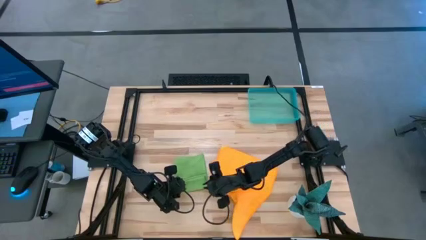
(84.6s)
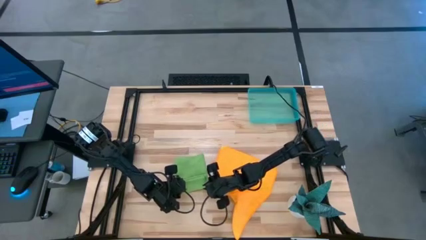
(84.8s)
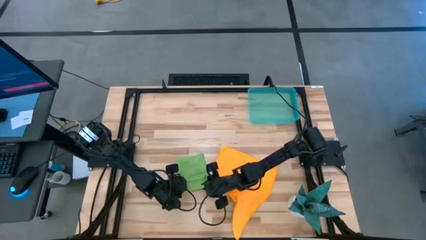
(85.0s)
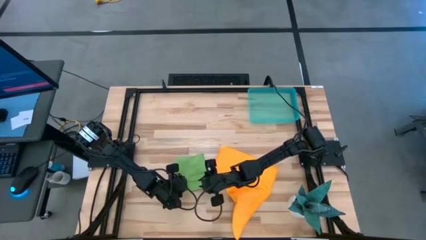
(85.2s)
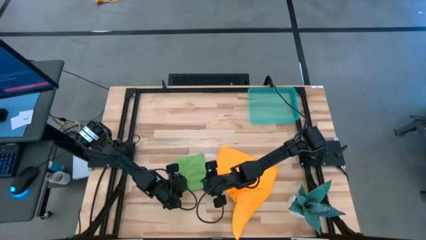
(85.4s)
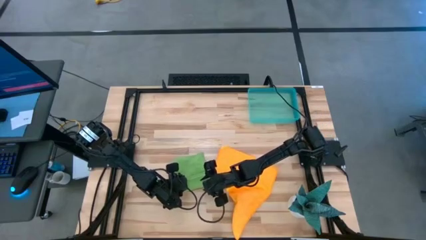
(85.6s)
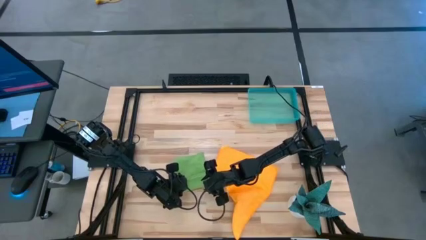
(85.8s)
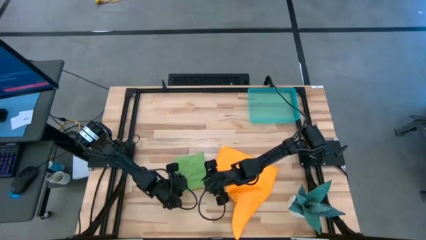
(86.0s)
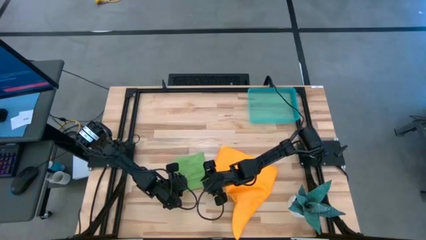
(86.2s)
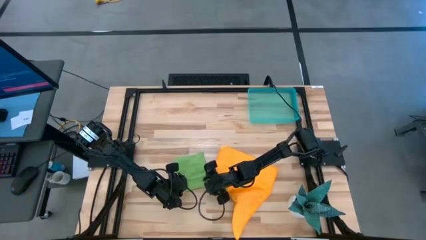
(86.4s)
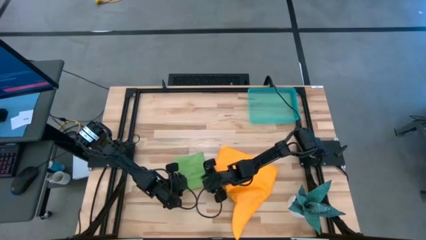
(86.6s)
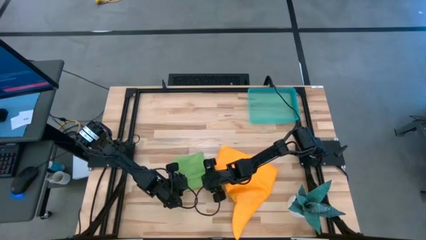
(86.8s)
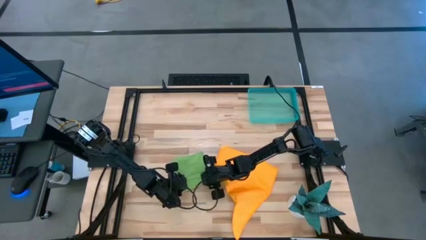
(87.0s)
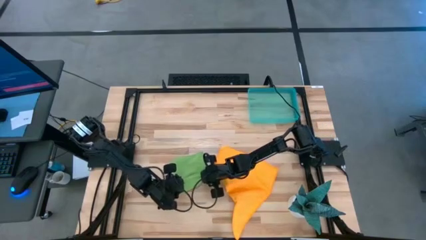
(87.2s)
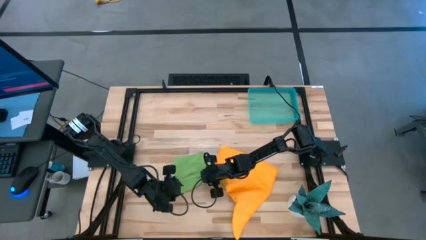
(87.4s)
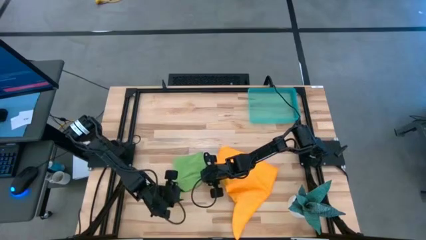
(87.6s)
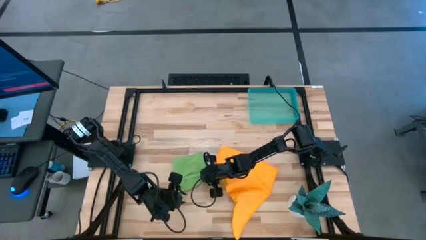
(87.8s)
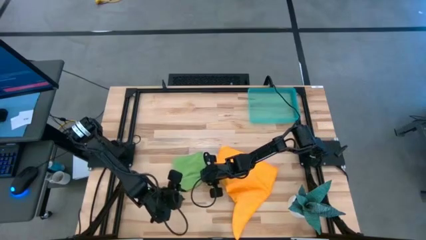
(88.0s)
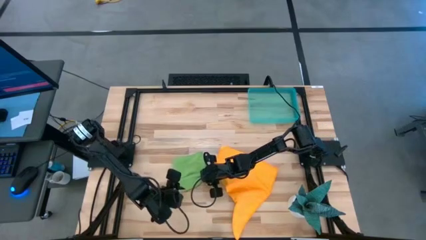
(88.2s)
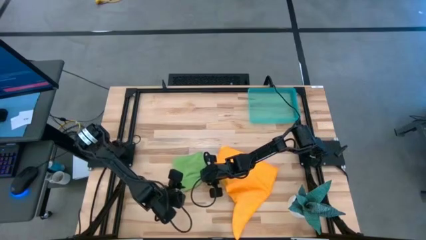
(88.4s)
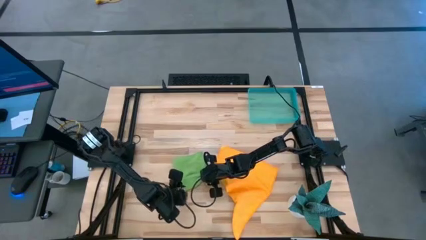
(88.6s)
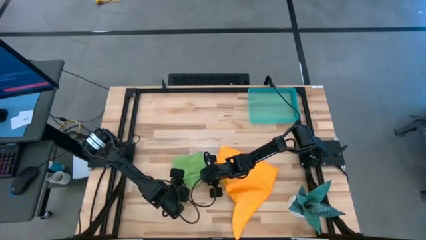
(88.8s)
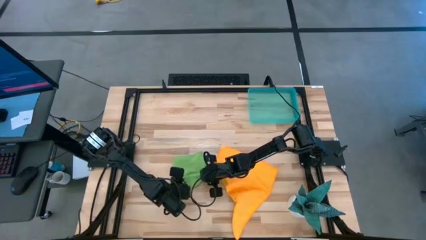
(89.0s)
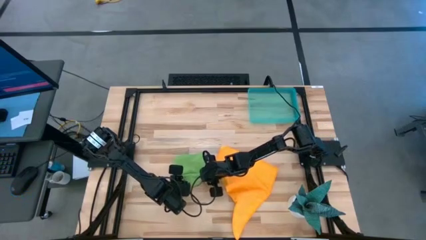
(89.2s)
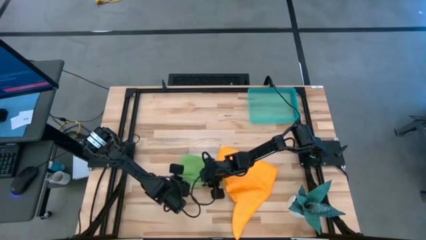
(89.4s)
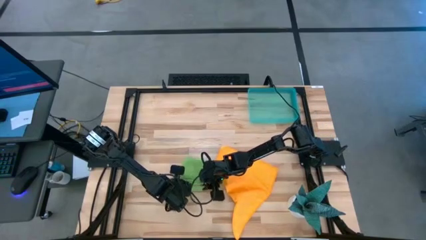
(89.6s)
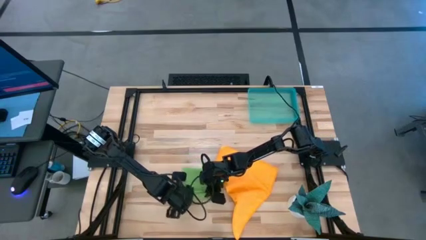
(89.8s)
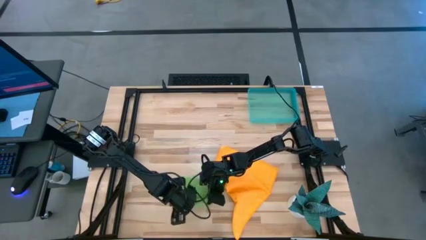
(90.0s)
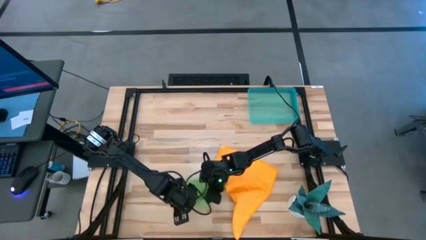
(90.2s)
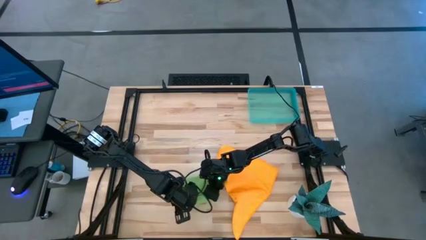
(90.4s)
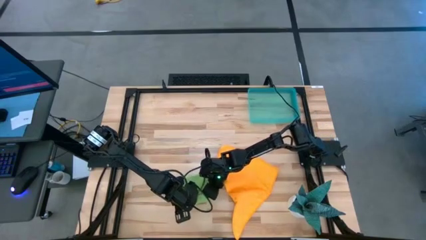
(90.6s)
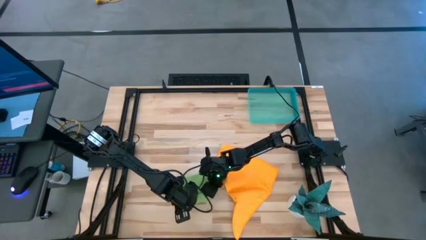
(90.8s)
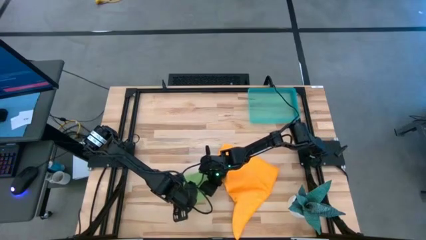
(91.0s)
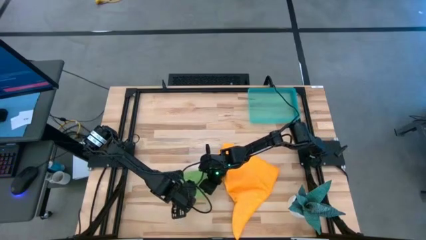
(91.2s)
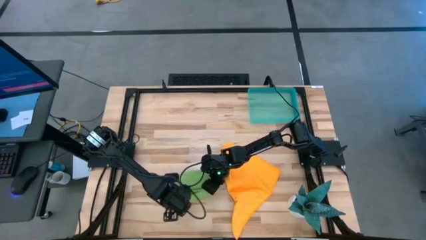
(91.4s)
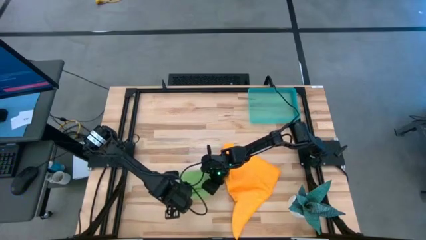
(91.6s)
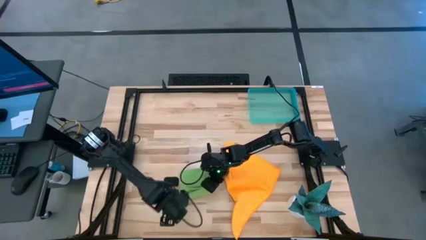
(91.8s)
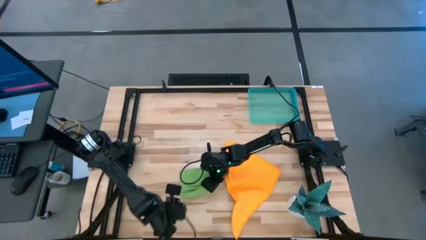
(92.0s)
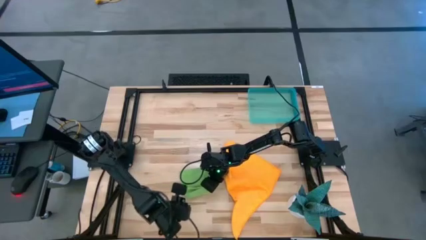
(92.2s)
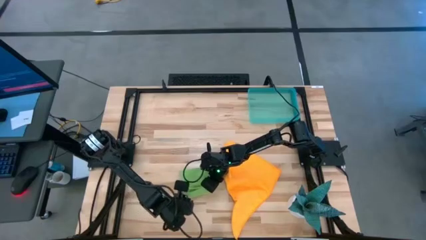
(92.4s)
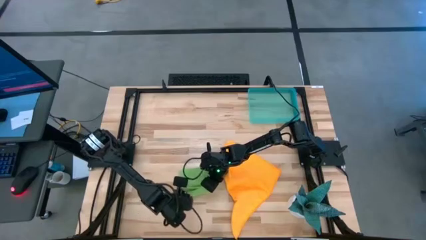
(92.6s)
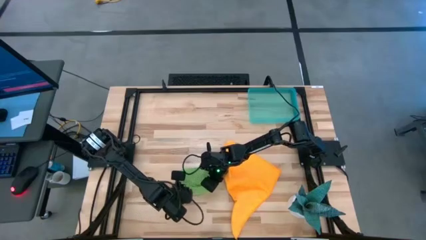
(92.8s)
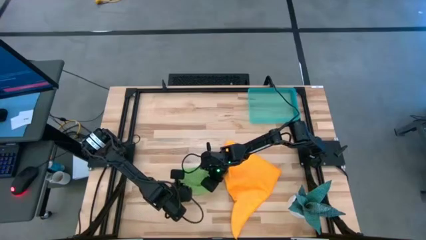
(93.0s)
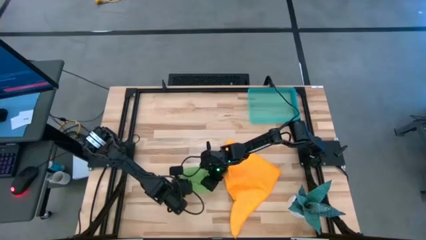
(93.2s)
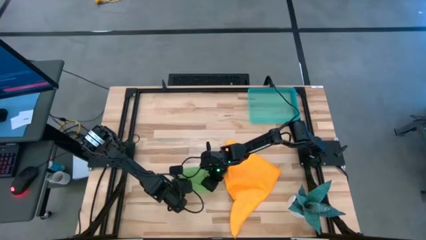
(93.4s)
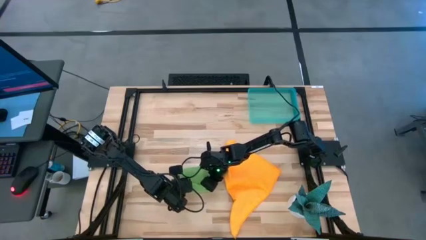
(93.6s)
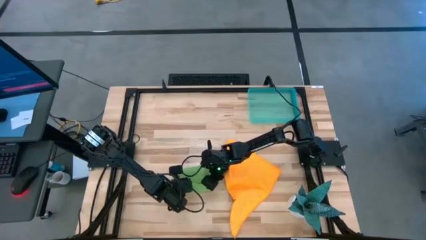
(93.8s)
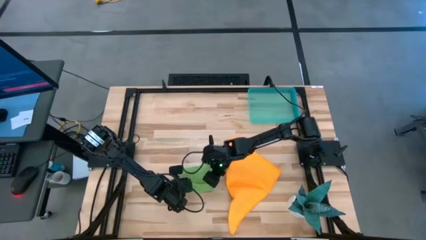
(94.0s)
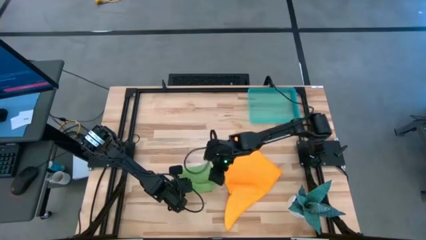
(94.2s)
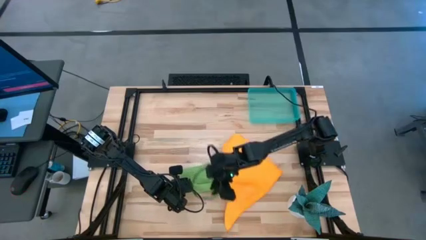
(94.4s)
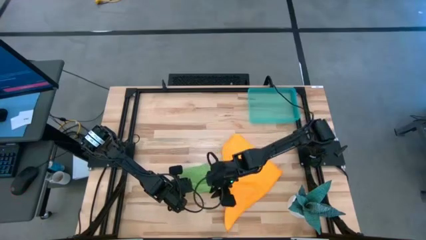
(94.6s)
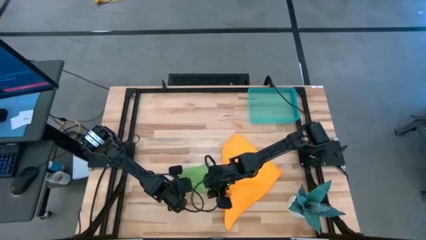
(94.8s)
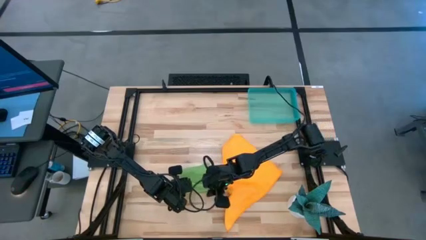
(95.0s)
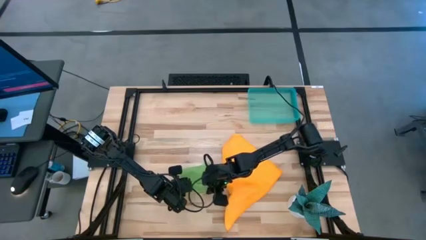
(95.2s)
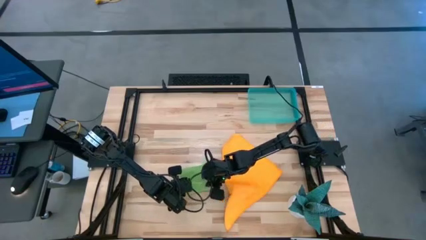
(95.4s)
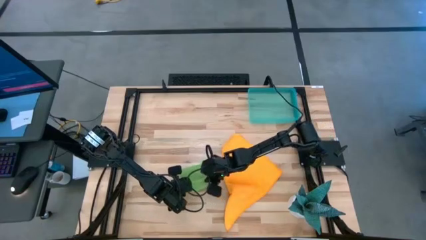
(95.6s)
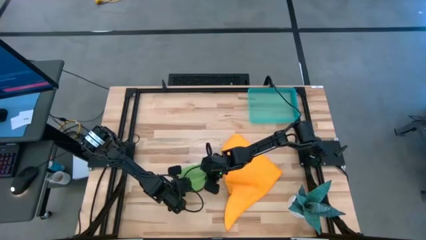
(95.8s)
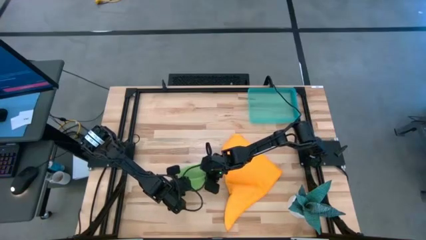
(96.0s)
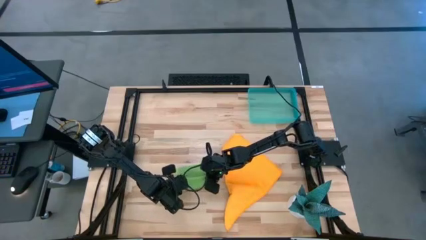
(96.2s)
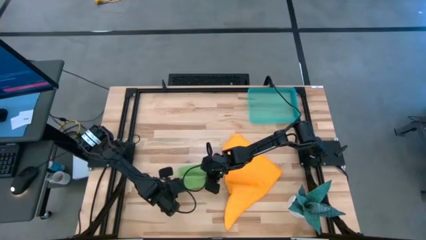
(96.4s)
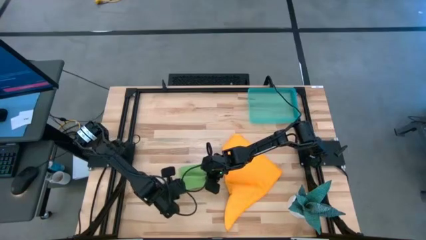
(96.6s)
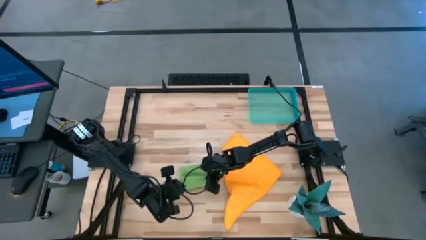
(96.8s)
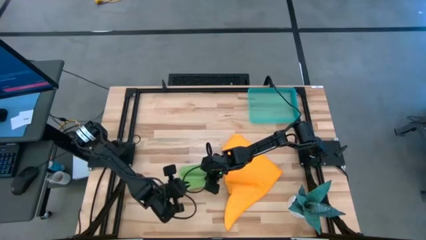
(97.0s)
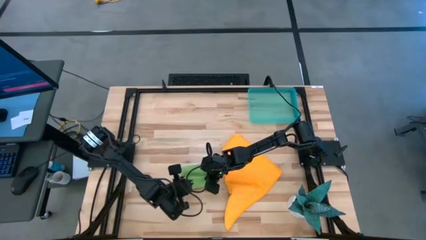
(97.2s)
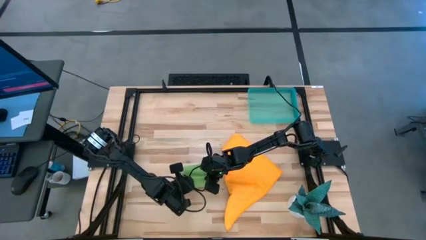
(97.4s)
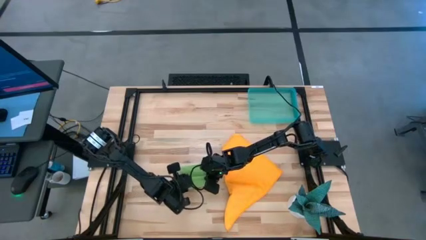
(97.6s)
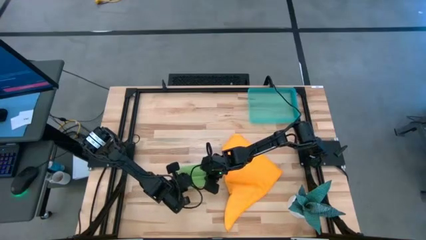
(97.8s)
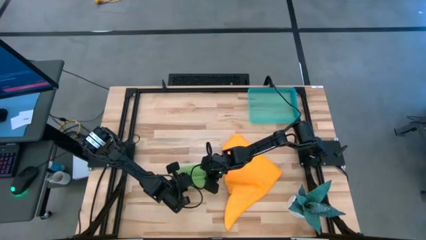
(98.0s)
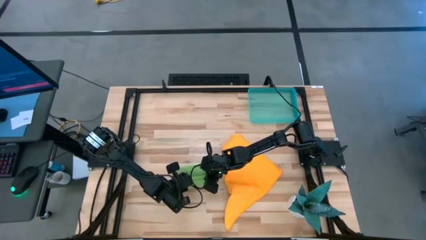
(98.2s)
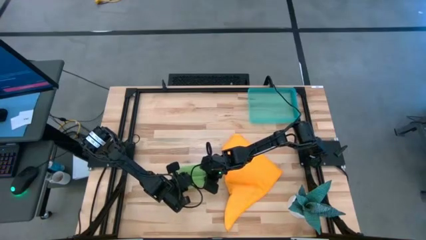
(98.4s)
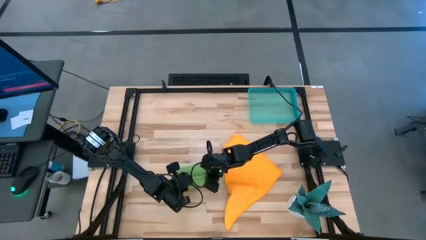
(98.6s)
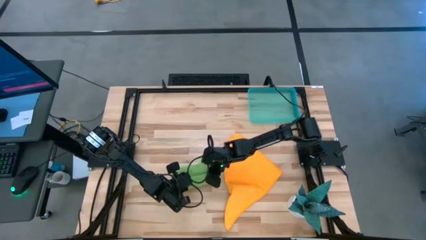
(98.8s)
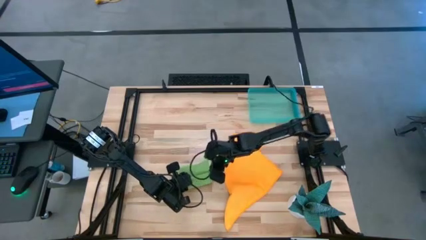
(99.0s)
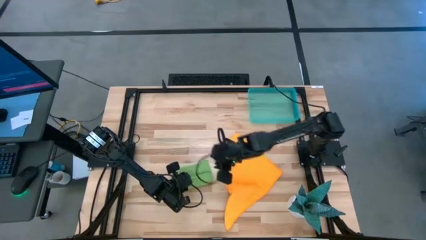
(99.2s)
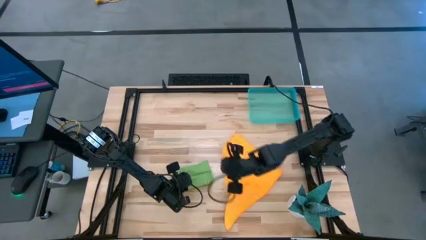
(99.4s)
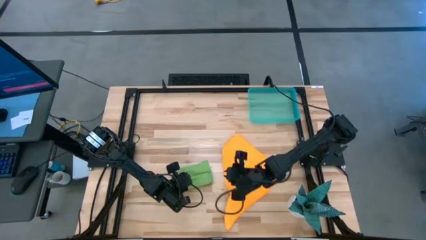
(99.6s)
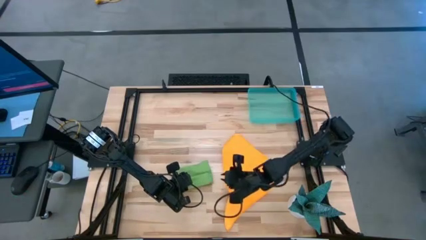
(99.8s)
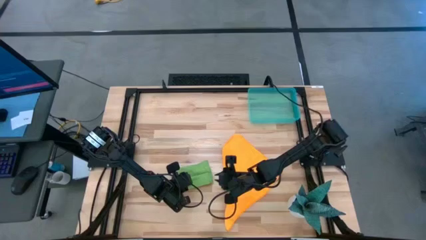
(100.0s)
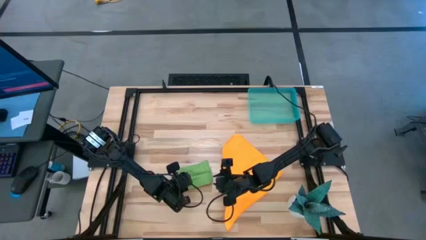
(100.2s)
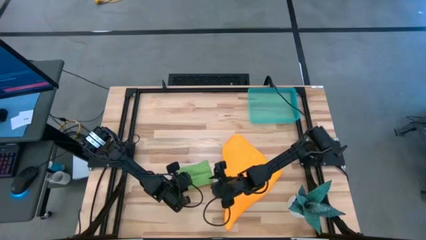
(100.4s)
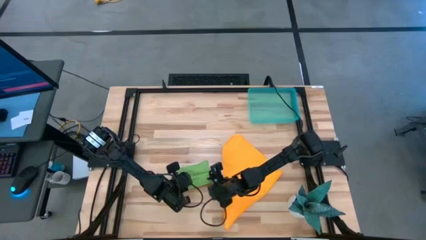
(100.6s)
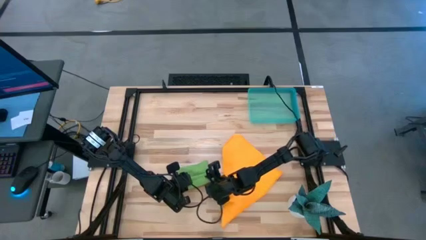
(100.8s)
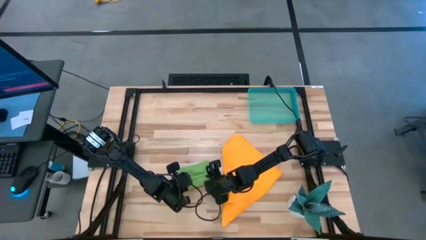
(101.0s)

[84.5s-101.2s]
Task: Roll microfiber towels into tight, uniform cylinder then place into a basket
Roll the green microfiber towel
